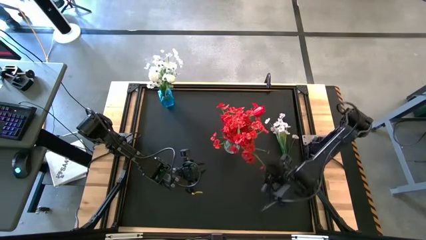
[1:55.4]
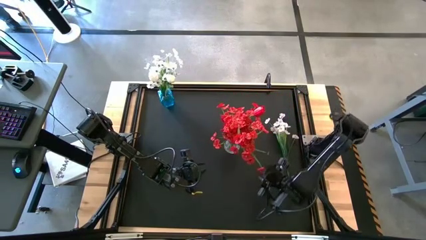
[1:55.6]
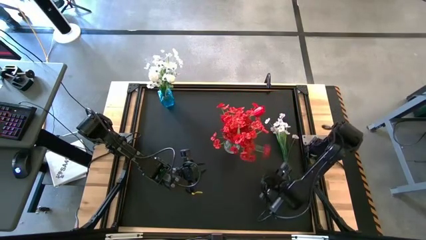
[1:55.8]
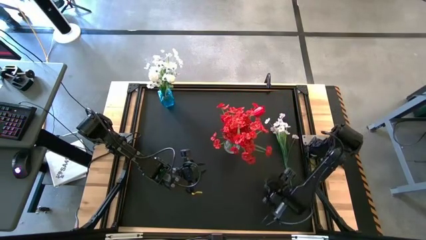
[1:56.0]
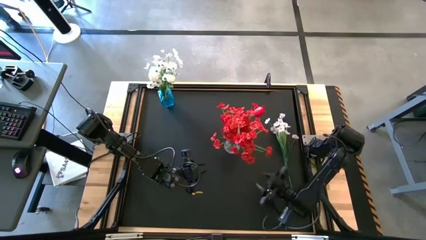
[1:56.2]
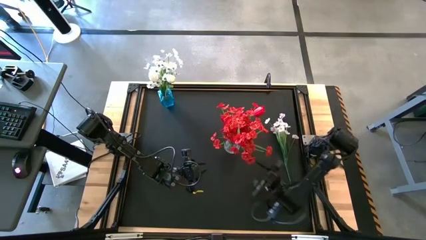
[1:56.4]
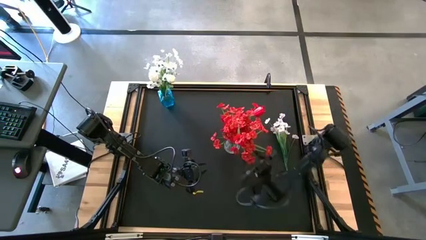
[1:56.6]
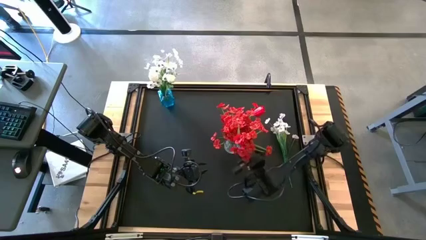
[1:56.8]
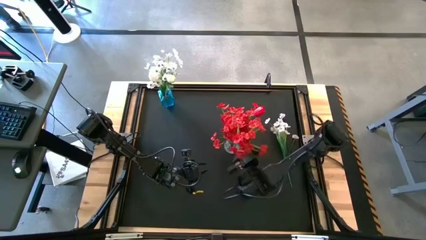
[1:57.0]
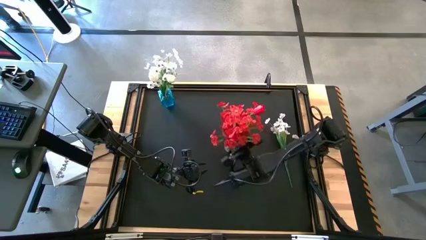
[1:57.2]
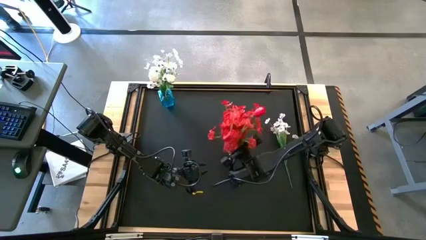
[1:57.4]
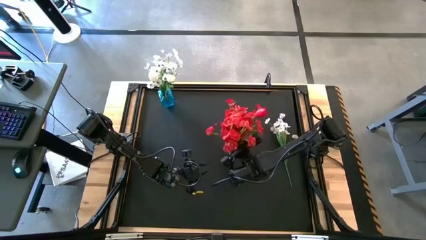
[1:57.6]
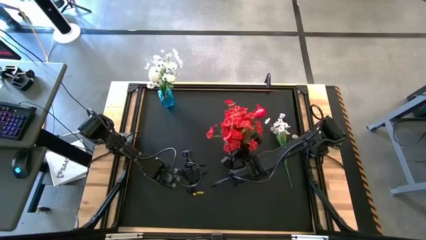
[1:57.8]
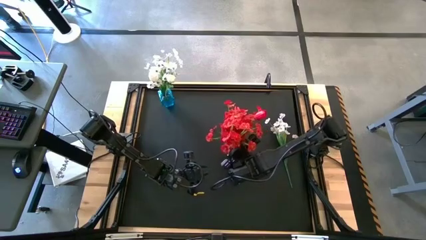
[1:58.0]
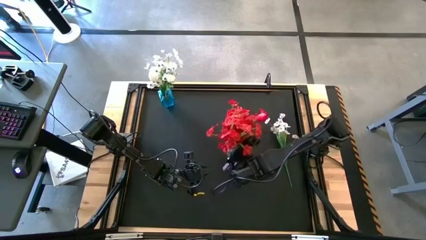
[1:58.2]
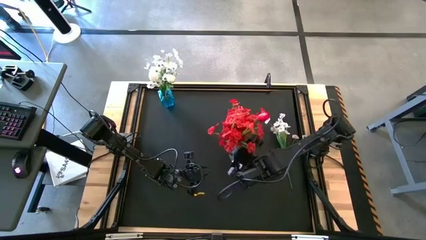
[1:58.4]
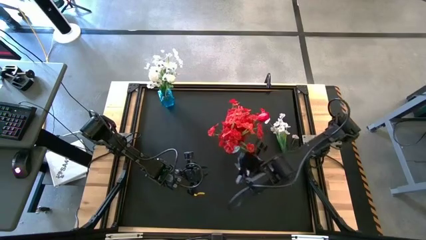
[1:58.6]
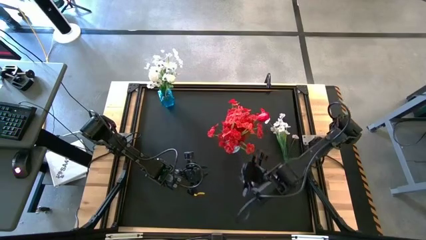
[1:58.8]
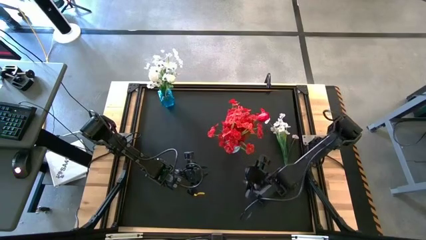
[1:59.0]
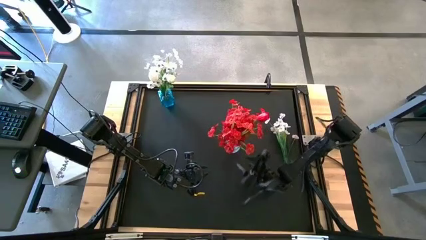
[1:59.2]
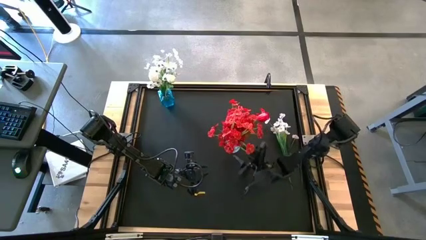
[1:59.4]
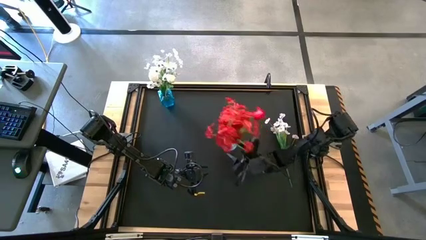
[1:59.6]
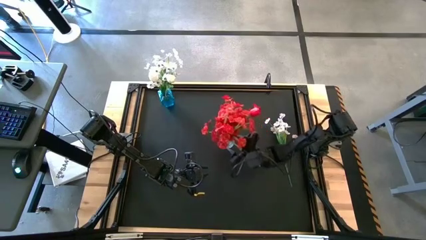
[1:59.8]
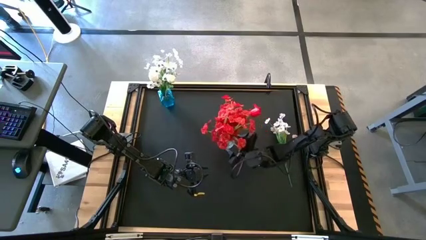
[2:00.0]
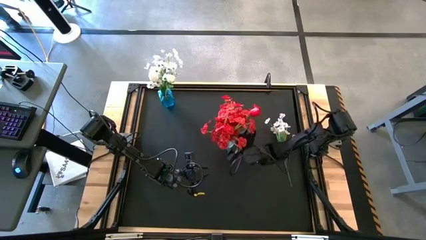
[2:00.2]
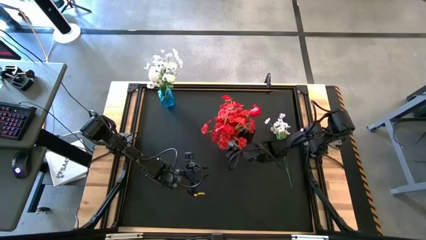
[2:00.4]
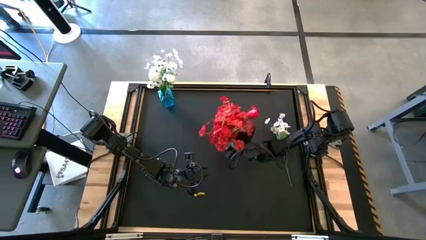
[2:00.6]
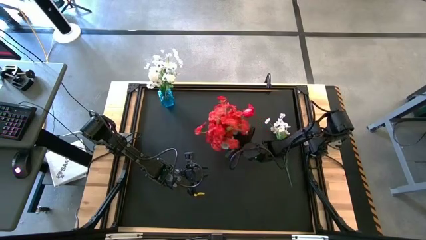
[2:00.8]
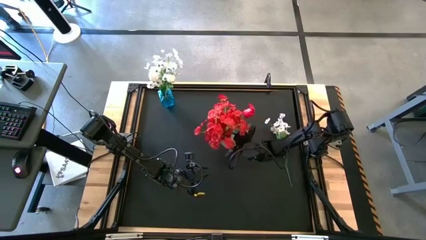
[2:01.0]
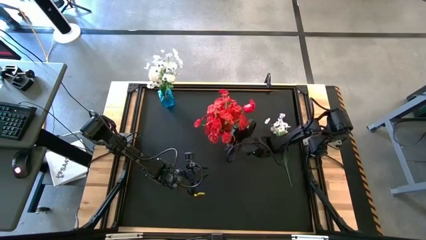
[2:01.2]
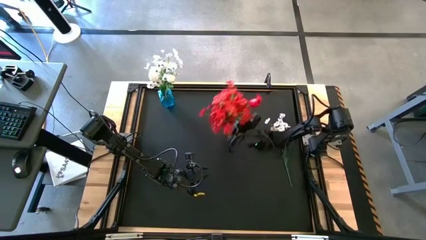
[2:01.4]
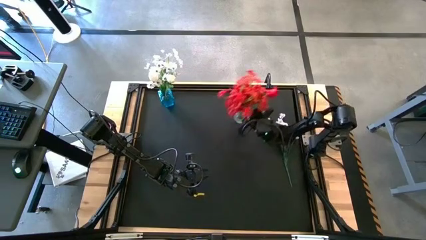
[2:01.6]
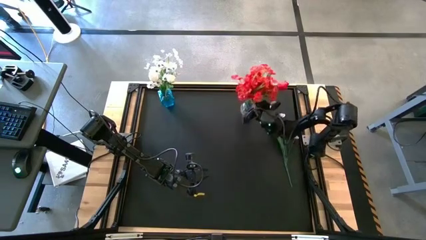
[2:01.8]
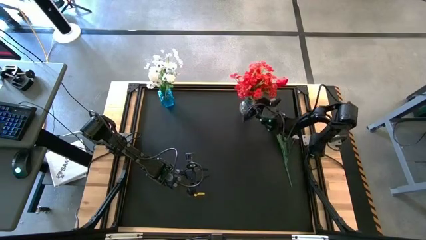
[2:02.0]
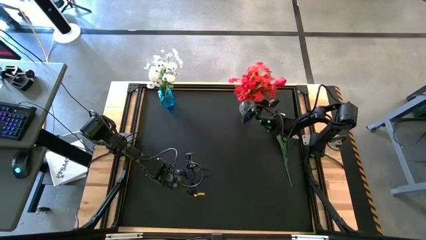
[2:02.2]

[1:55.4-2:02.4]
Task: Sort flowers into vase by color
Move the transparent vase to the top right of the table

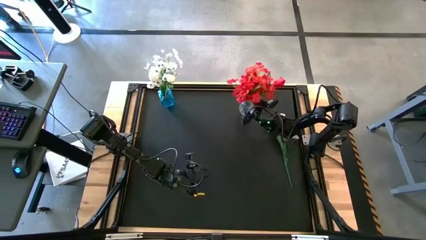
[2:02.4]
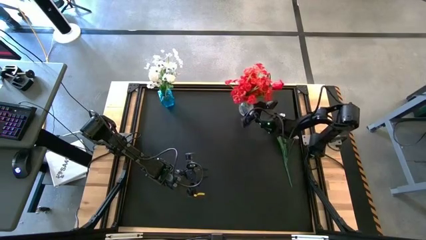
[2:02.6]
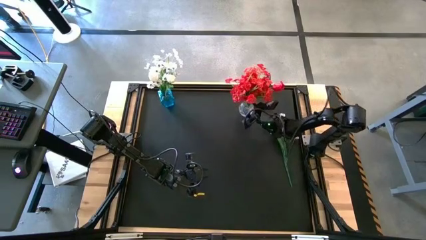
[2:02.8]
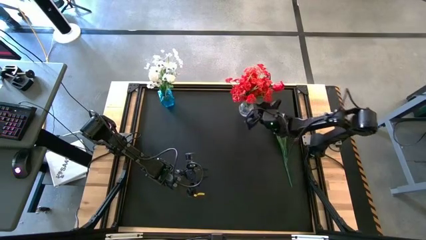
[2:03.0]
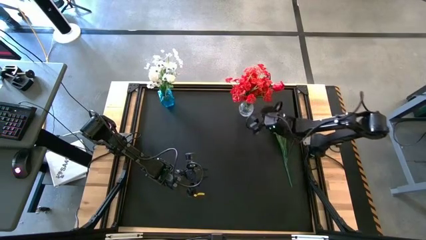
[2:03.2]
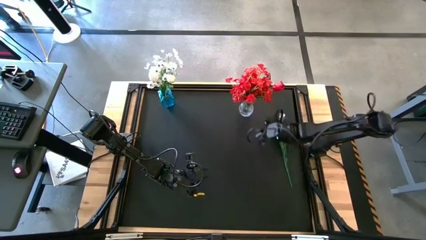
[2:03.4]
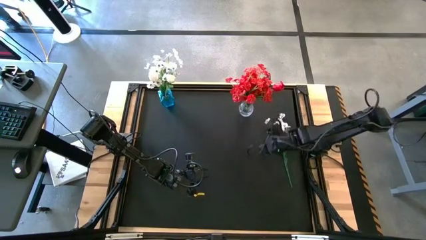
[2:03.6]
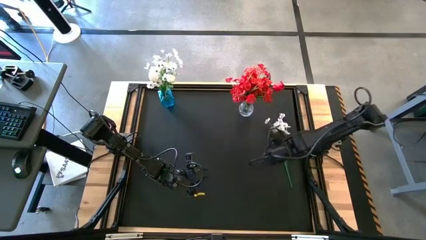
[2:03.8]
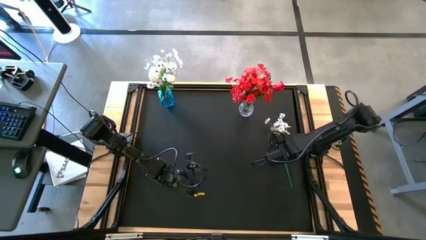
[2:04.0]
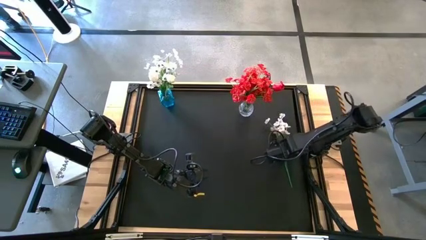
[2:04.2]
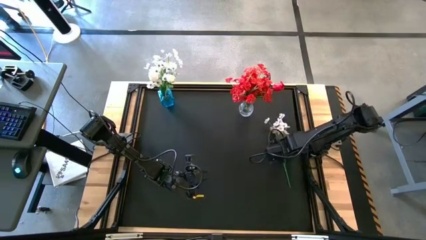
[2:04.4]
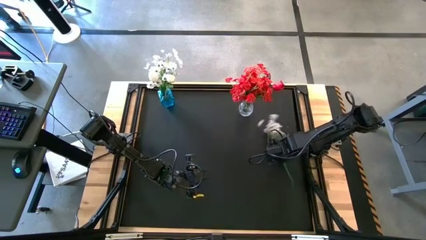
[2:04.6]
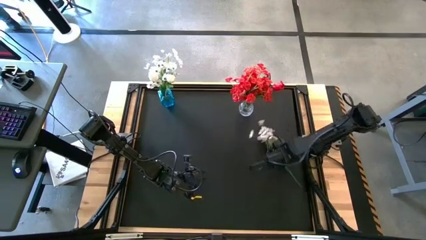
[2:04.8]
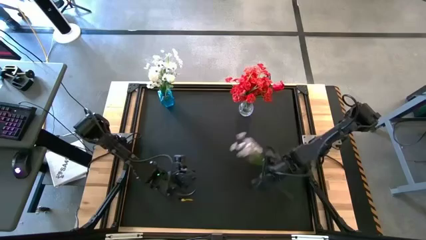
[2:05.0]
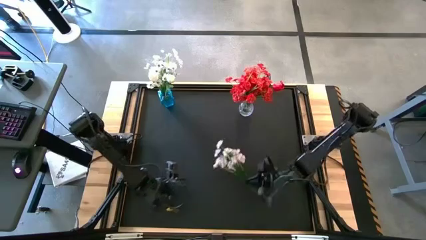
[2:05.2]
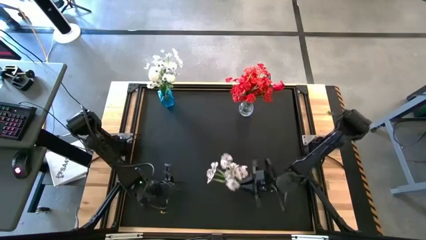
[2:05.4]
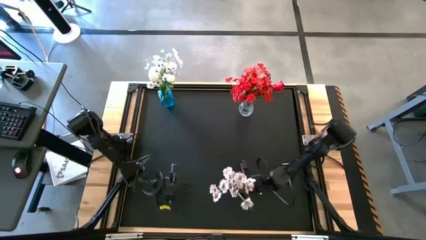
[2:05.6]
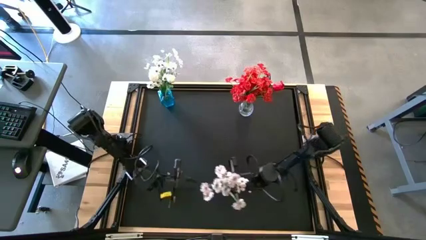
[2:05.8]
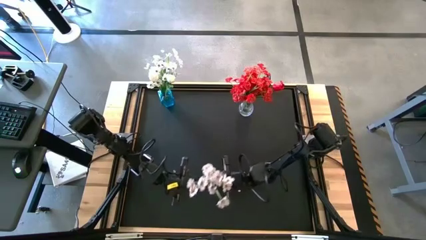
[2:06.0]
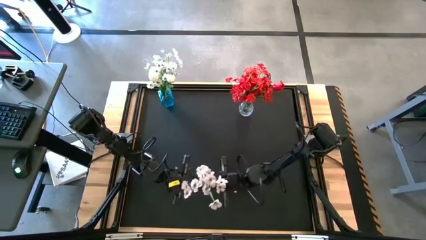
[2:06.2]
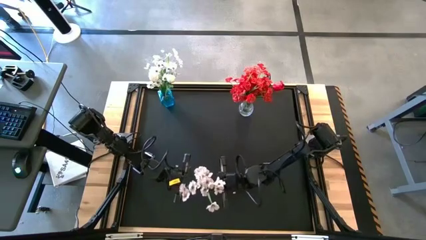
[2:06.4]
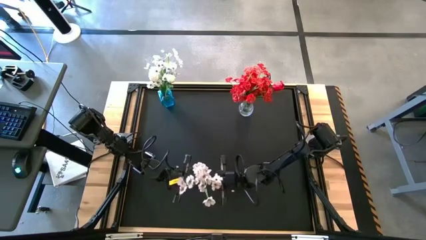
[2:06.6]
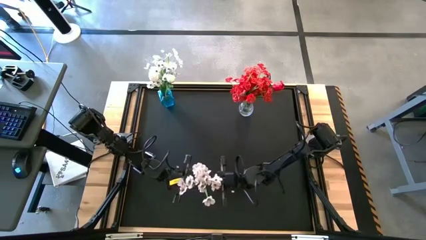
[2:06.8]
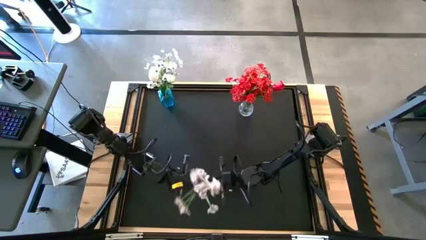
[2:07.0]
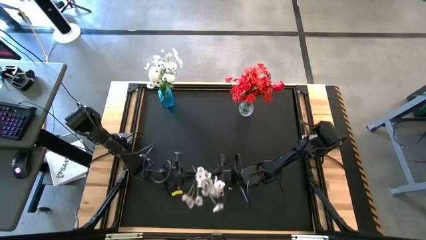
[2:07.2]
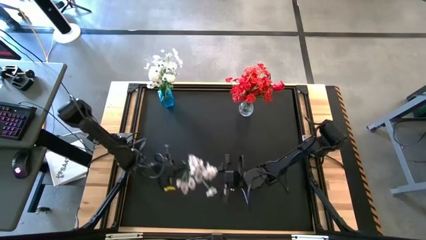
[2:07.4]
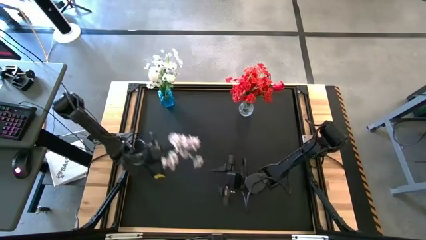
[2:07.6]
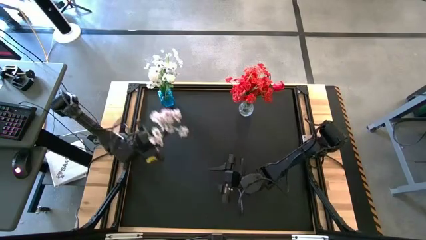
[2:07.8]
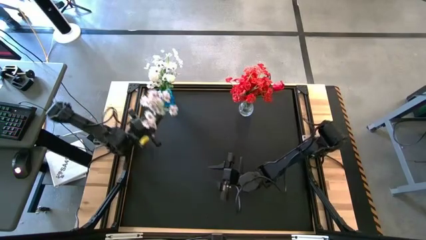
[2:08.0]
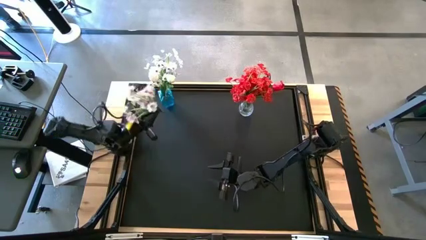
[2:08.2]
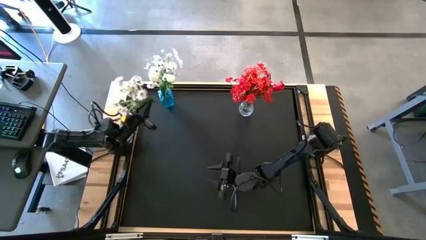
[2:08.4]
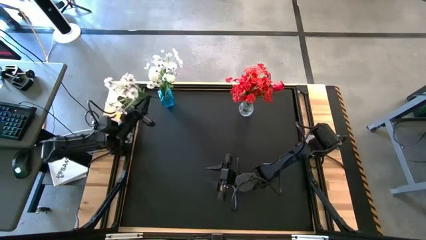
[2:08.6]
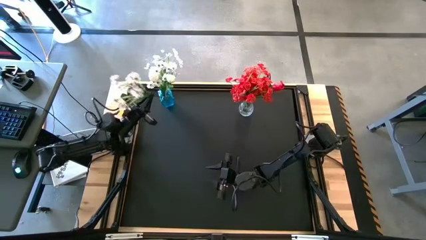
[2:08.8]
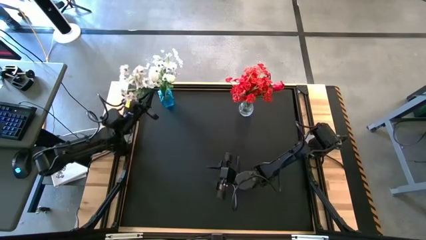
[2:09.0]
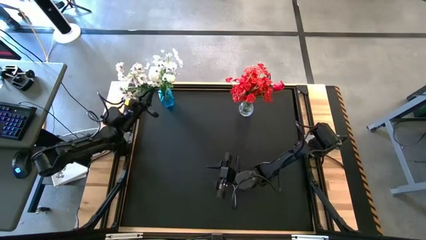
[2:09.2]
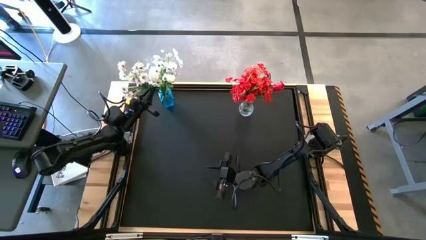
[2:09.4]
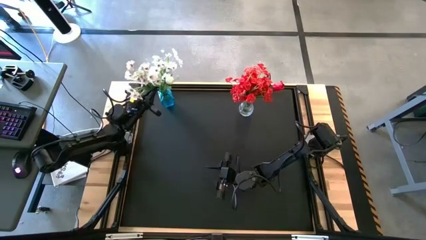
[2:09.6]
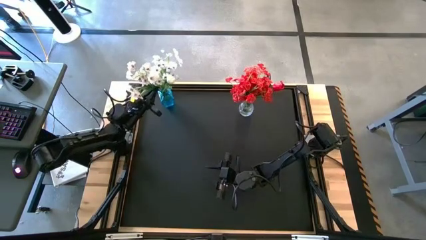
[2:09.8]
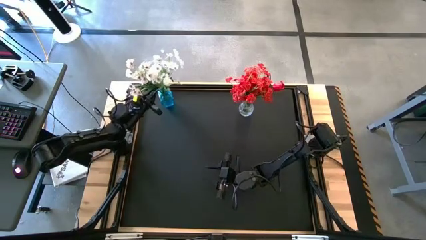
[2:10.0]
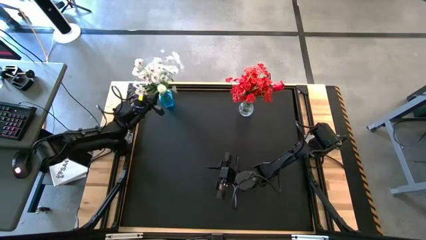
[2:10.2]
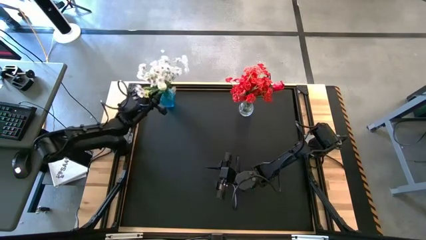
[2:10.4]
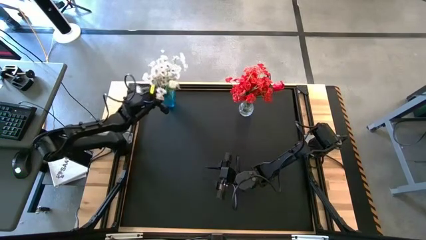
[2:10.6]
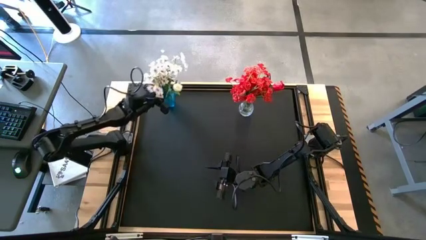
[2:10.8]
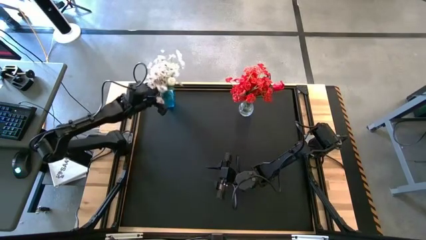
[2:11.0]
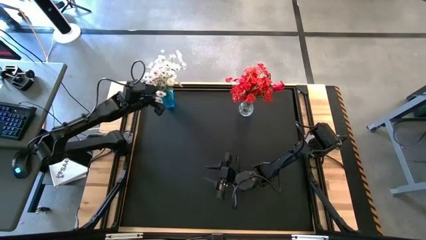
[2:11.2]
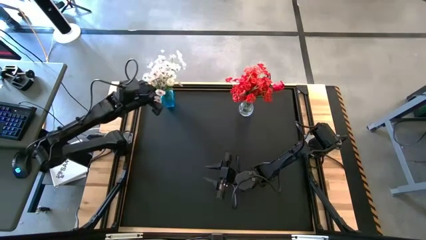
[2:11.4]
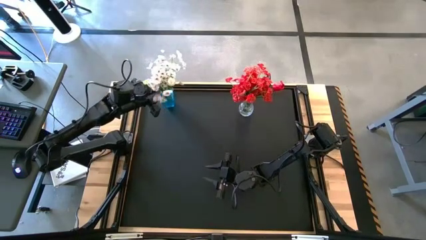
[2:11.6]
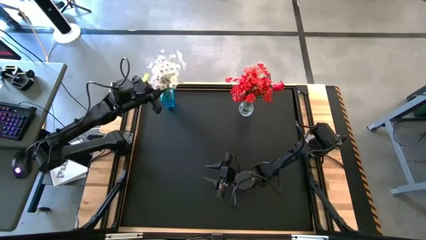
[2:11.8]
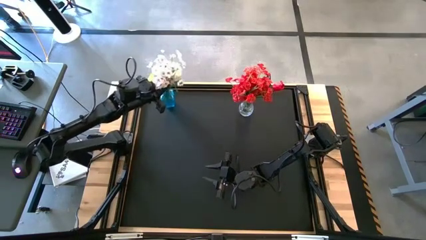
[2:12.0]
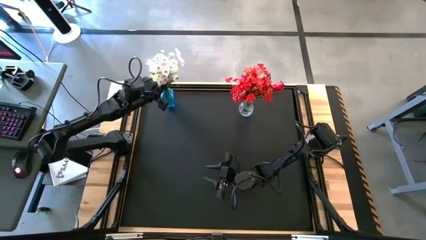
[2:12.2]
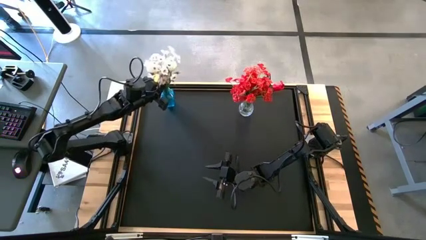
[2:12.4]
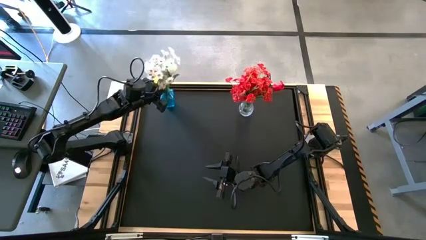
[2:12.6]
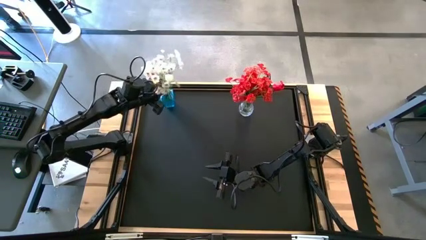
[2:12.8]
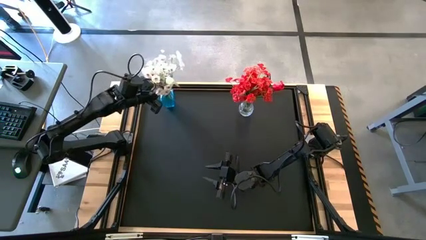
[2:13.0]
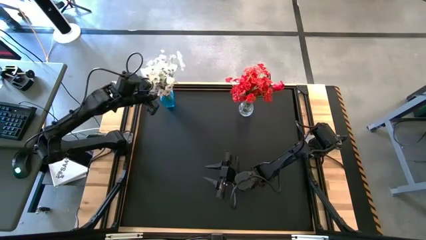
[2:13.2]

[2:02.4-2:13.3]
Put the white flowers into the blue vase
